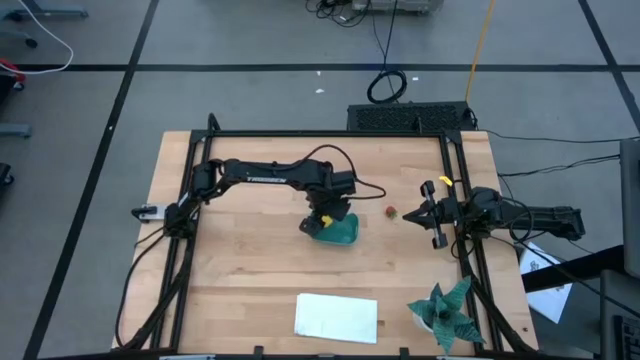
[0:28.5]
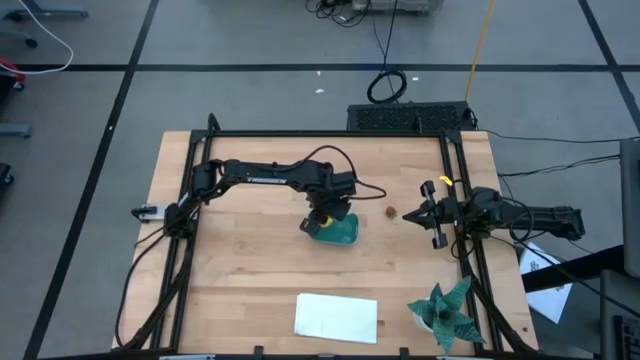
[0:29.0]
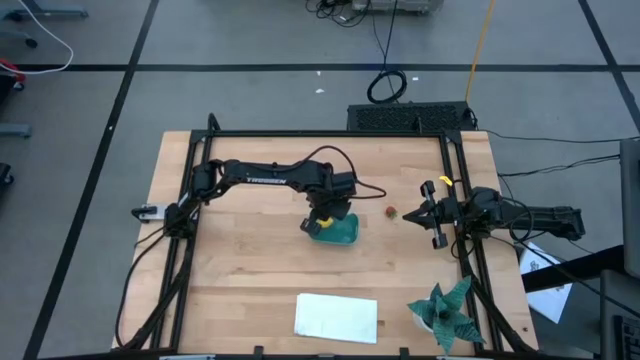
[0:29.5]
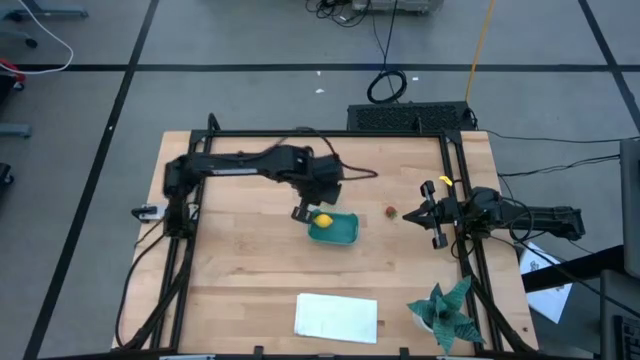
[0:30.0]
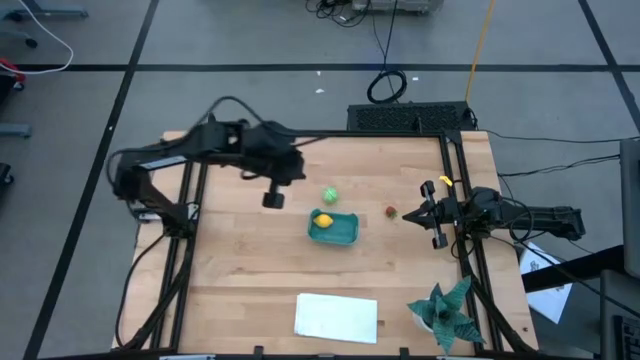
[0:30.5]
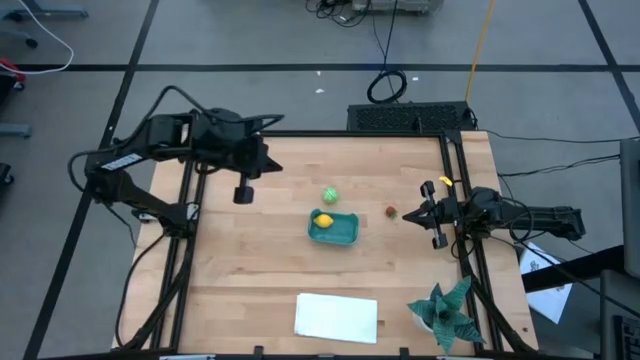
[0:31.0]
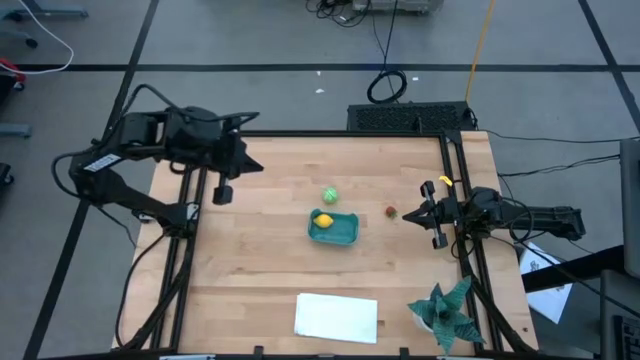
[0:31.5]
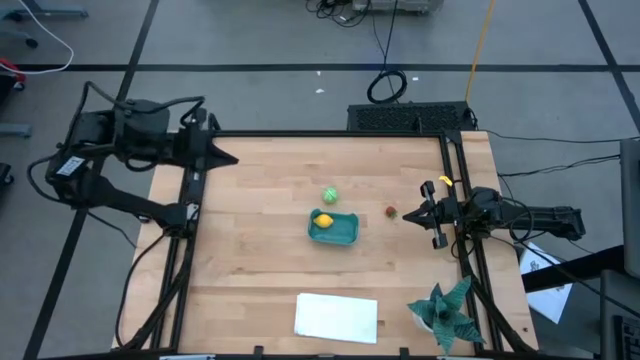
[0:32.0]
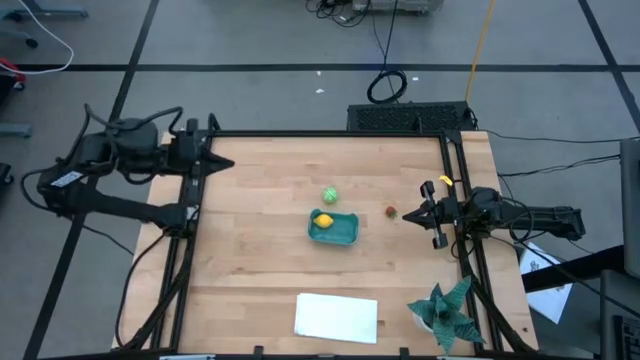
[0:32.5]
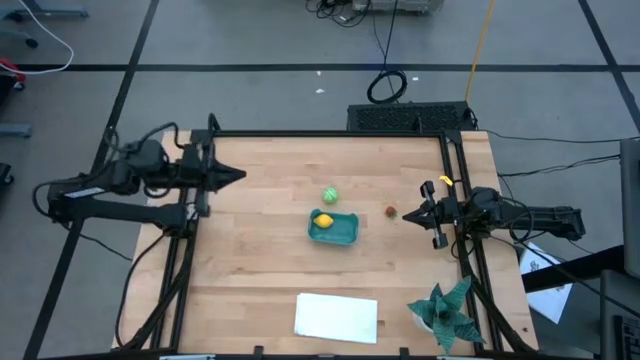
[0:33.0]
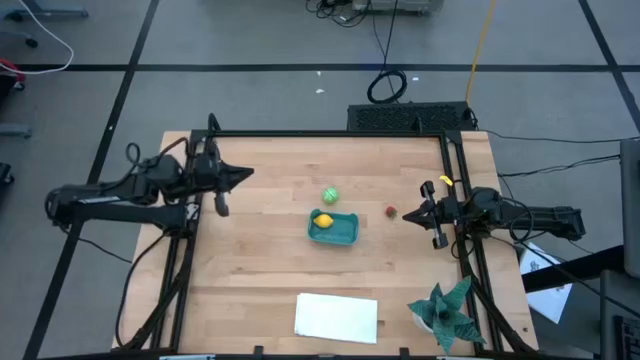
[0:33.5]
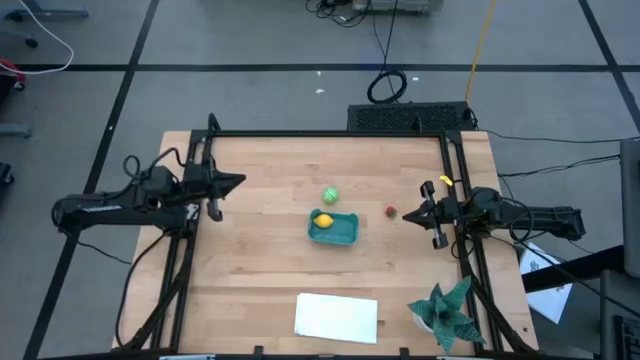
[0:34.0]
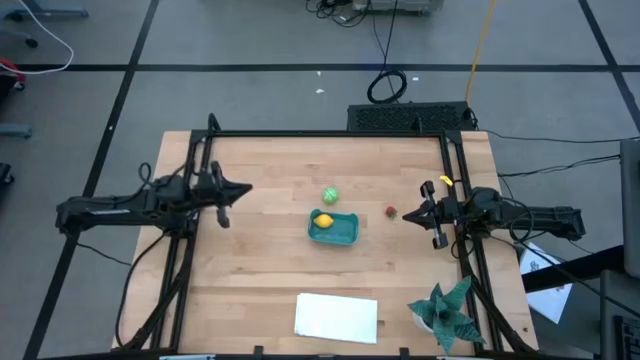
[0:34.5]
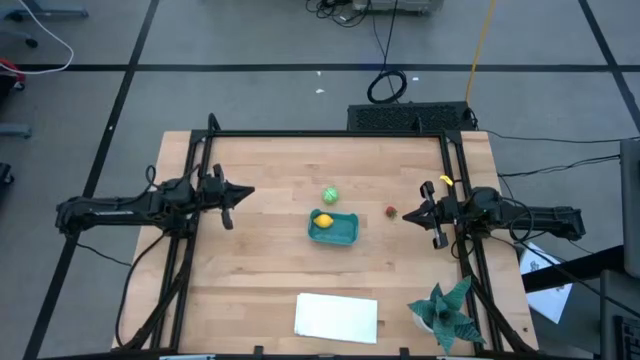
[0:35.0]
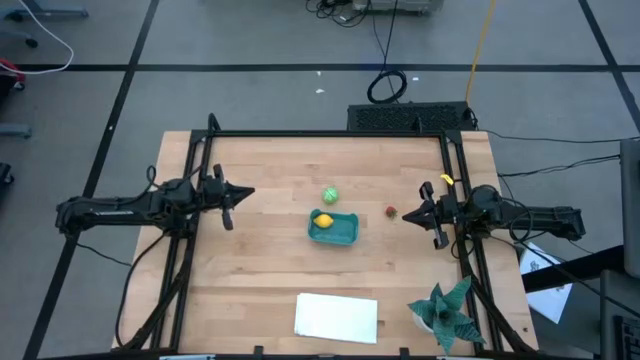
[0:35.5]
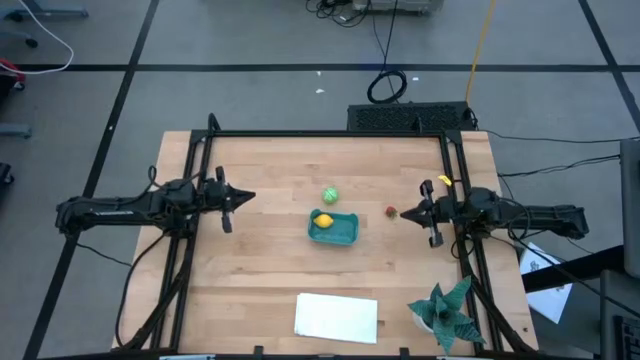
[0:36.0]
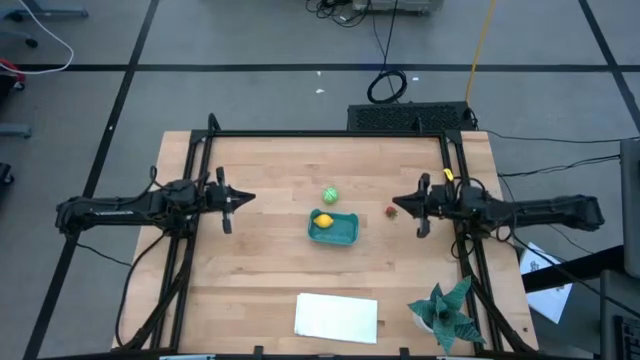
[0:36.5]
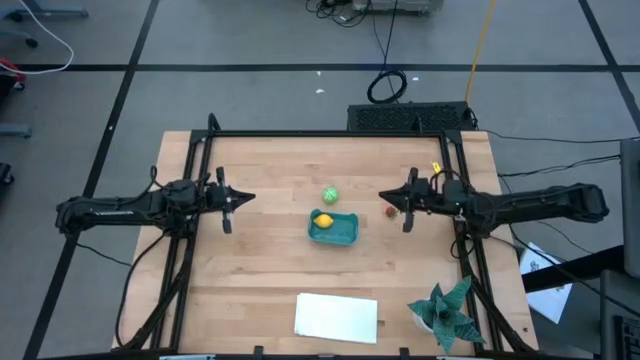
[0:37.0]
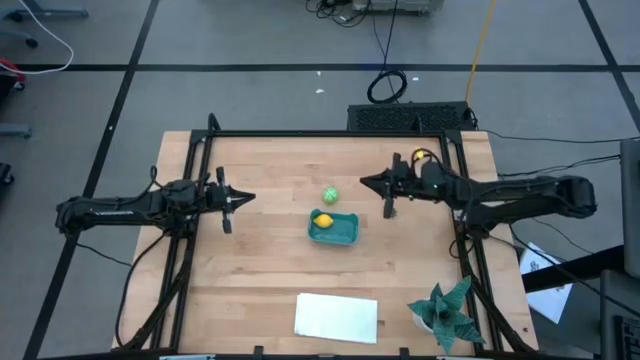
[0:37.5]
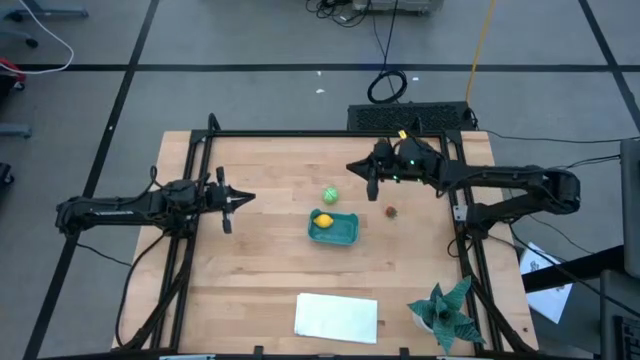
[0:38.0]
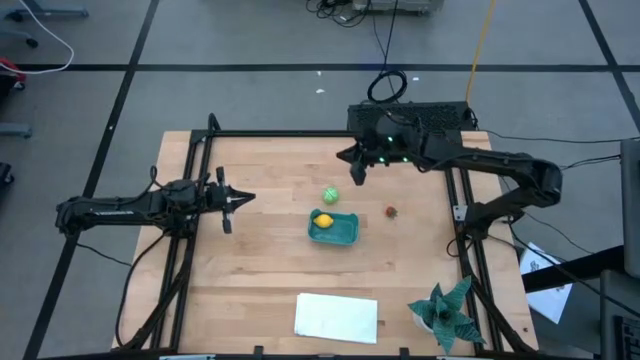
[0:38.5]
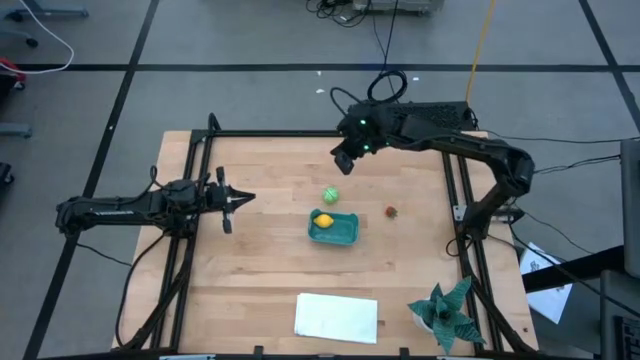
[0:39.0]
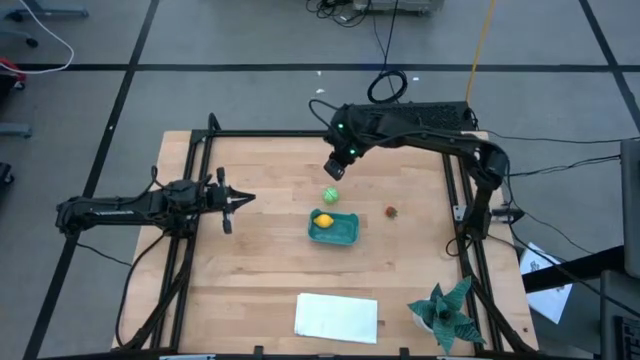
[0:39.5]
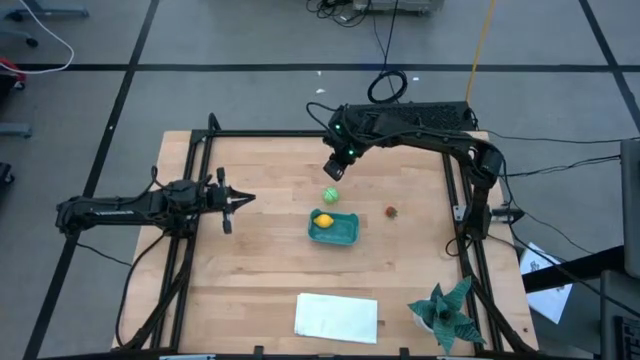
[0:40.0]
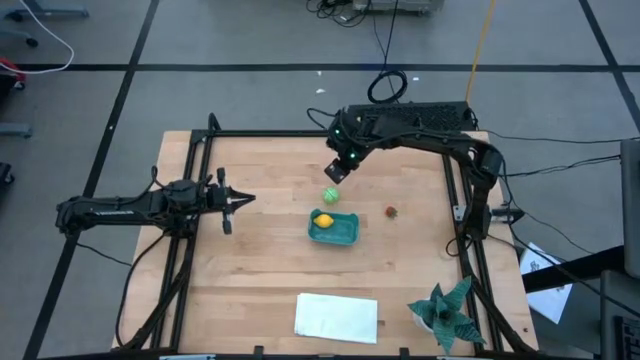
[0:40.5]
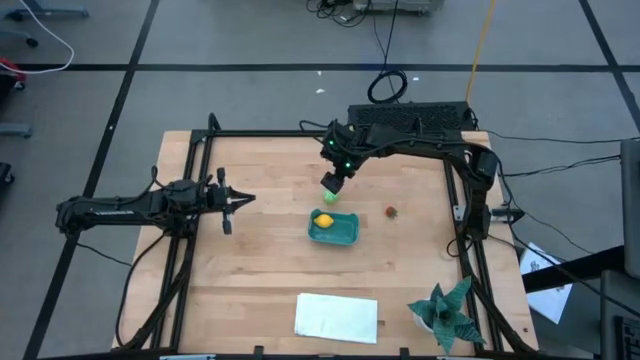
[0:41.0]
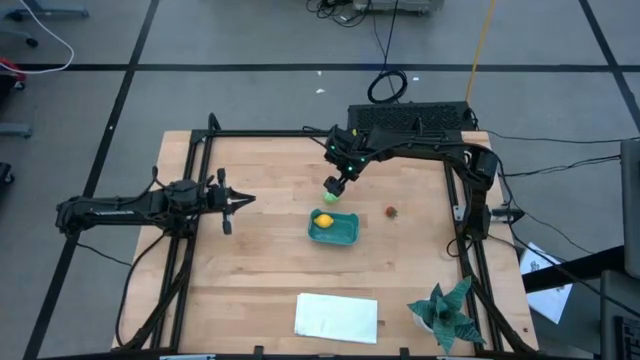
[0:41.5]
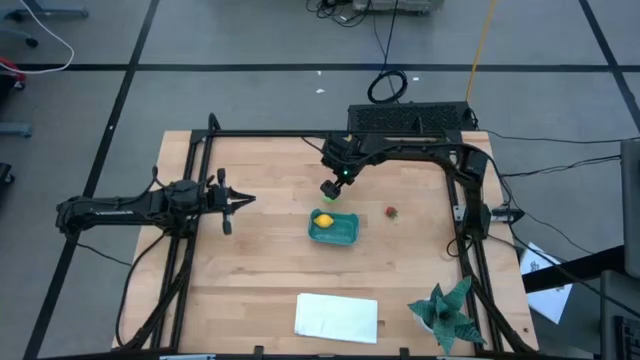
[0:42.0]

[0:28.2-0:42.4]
Task: Pick and placing Produce into tupperware
Put the green cabbage into the blue bin

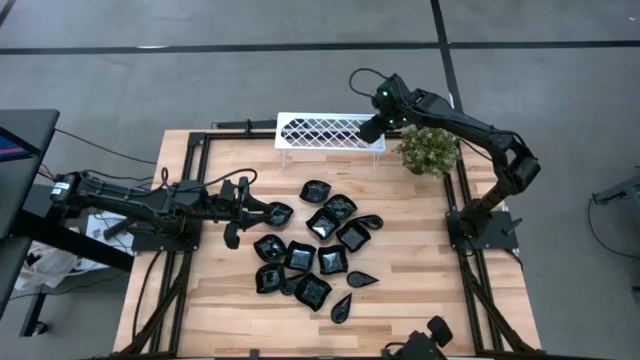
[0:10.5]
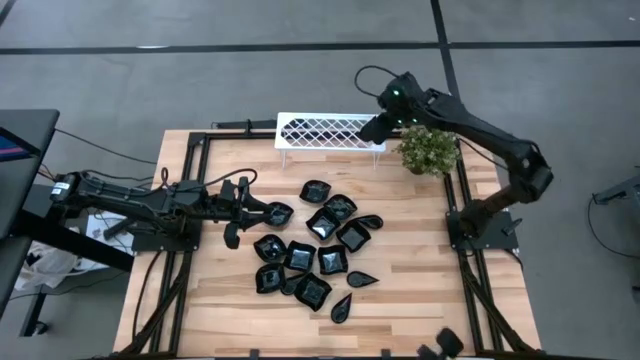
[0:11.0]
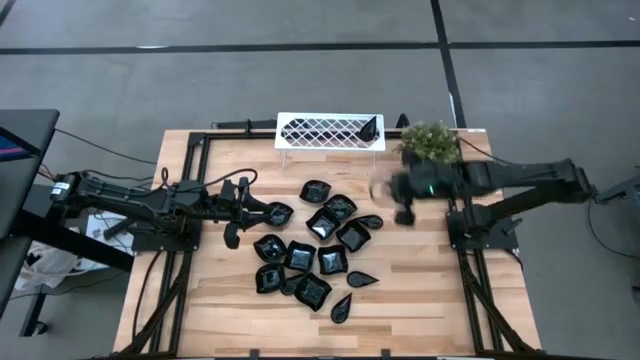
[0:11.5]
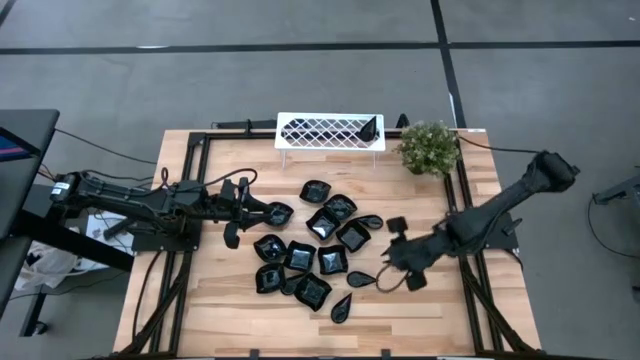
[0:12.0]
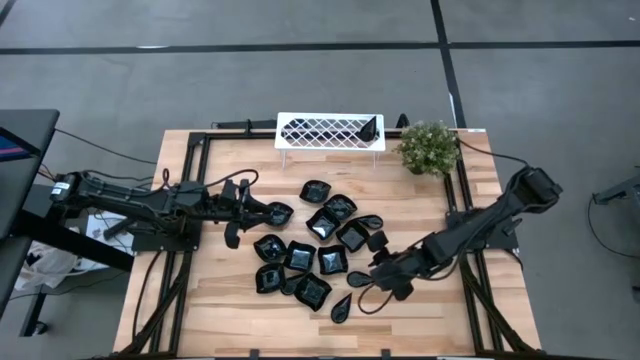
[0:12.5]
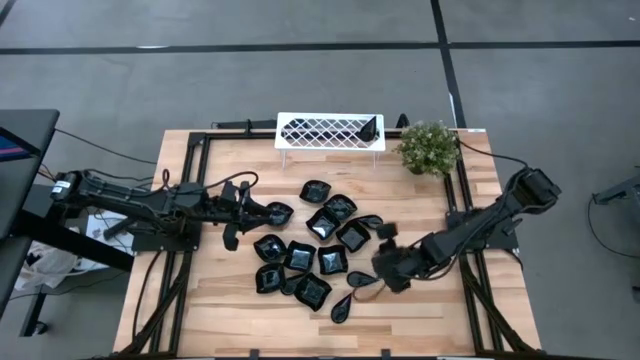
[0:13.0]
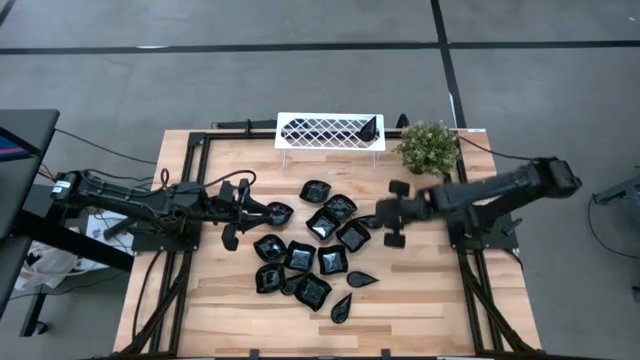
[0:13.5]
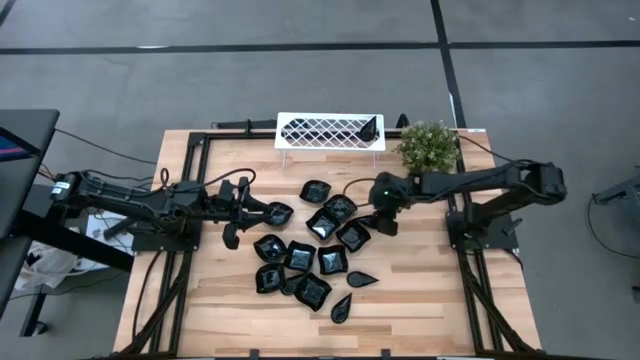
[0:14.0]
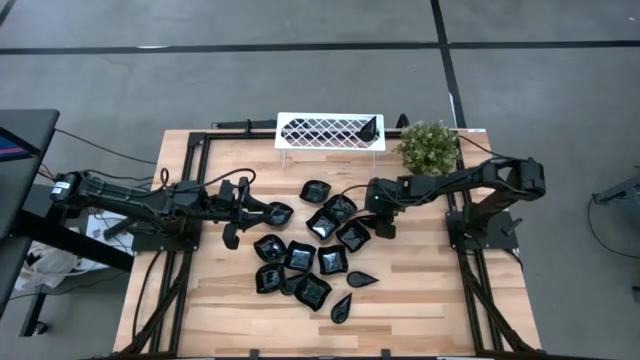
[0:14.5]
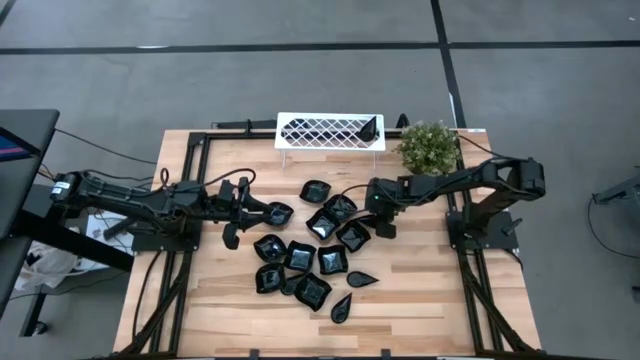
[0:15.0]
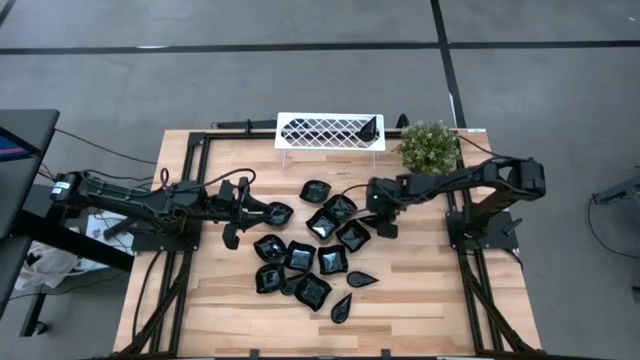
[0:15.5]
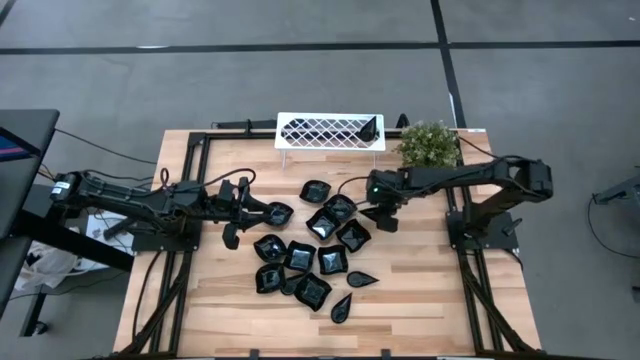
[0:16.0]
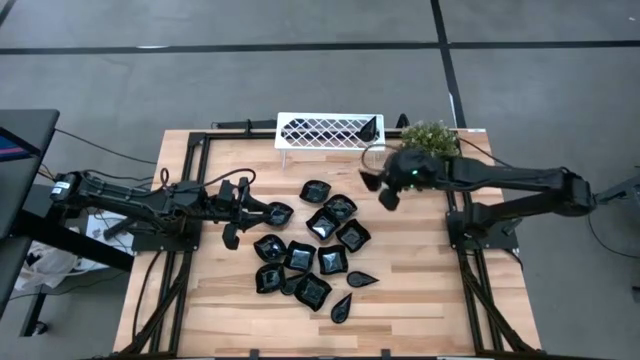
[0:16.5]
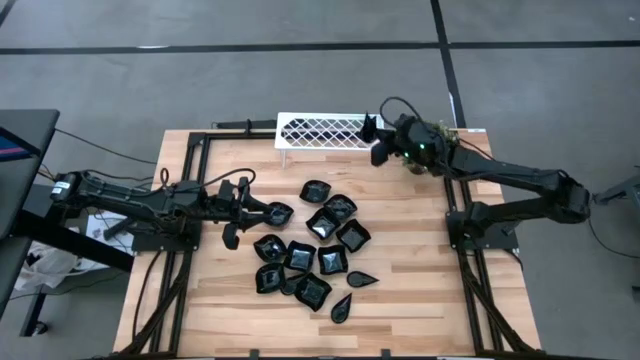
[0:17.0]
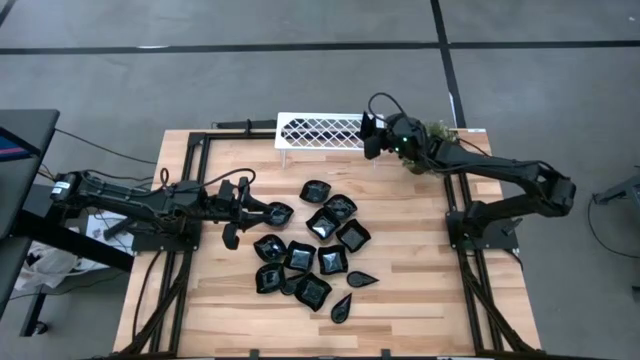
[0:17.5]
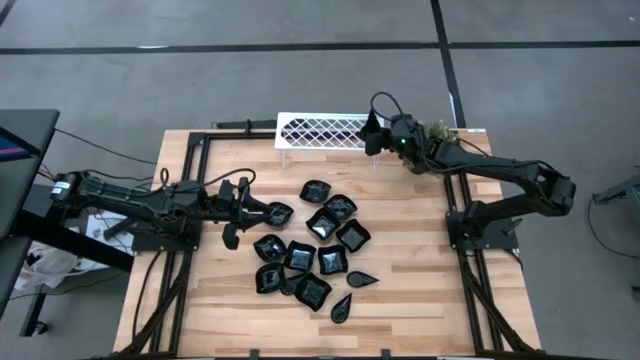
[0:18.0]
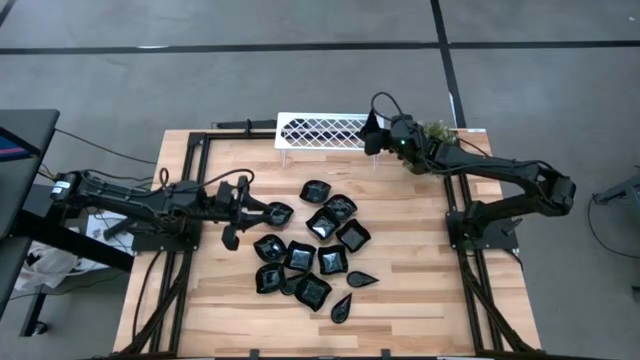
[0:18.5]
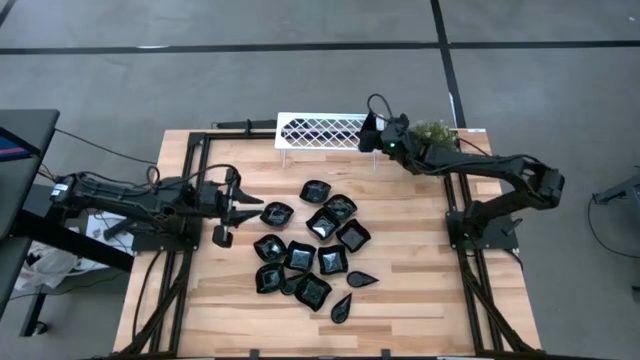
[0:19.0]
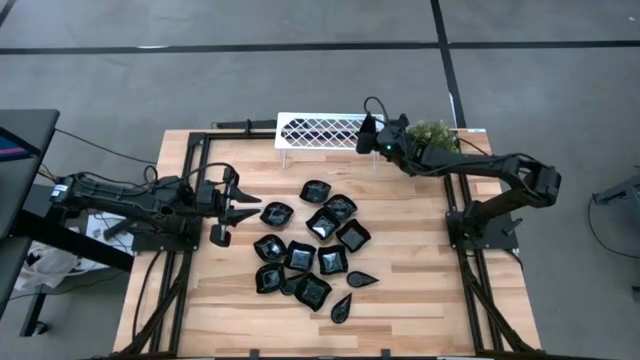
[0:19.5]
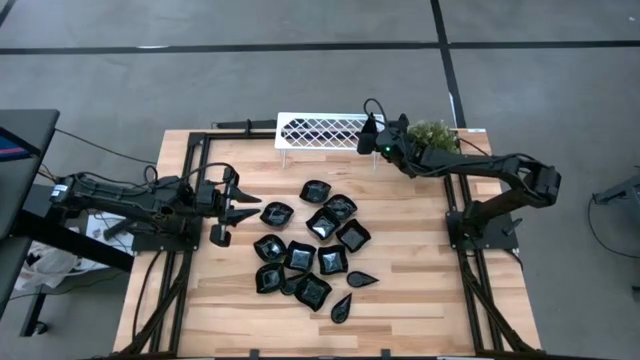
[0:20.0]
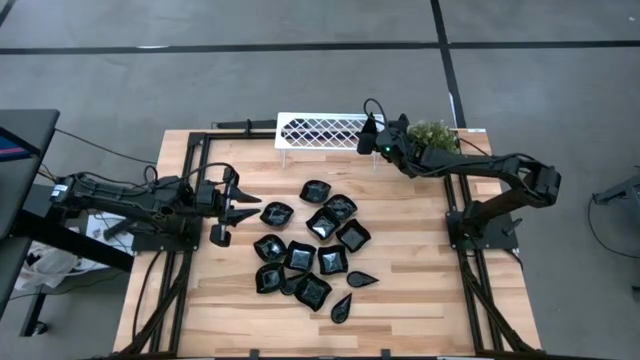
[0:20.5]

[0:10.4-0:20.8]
Task: Pick & Place Mini shaped plates
Stack the drop-shaped plate on top of the drop-shaped plate on the shelf
